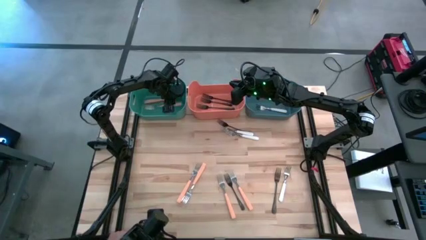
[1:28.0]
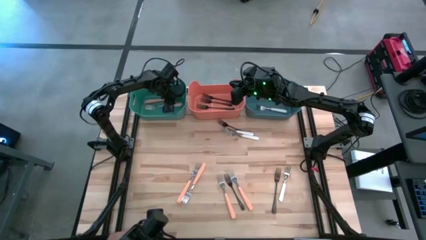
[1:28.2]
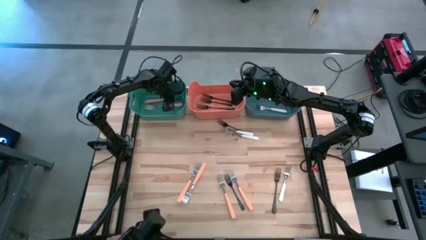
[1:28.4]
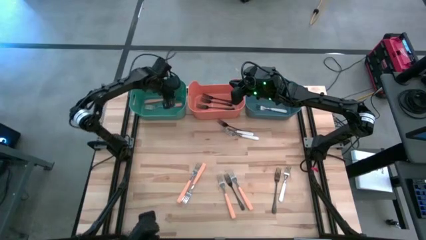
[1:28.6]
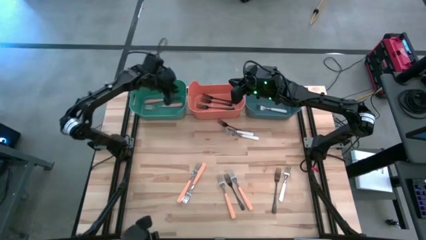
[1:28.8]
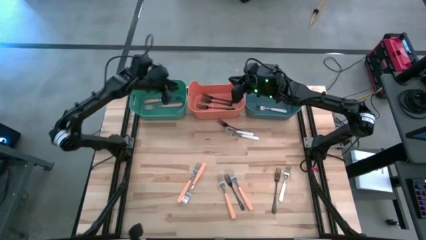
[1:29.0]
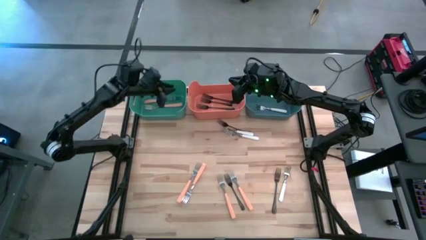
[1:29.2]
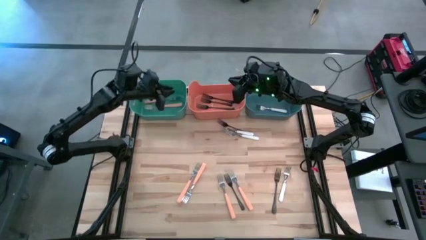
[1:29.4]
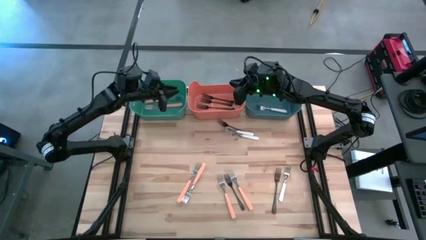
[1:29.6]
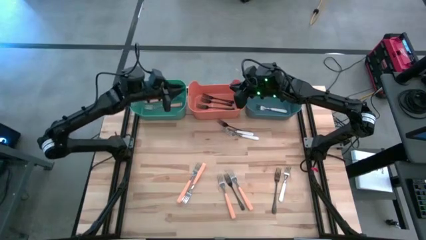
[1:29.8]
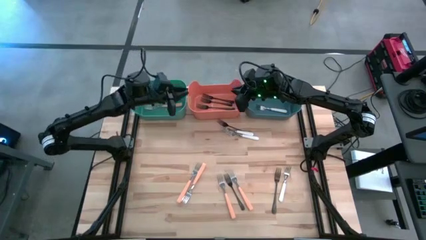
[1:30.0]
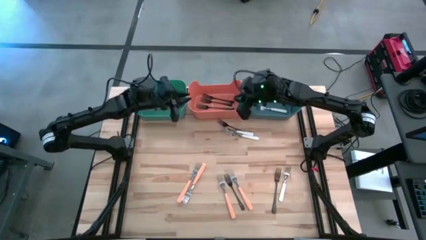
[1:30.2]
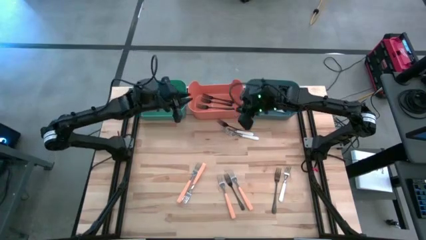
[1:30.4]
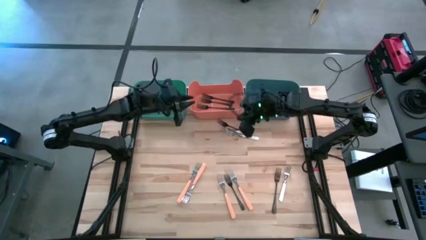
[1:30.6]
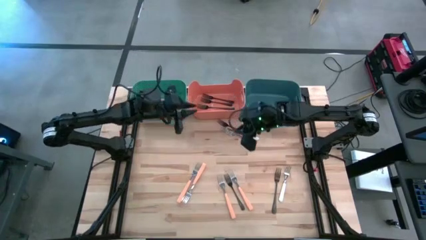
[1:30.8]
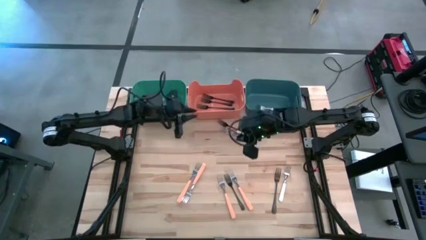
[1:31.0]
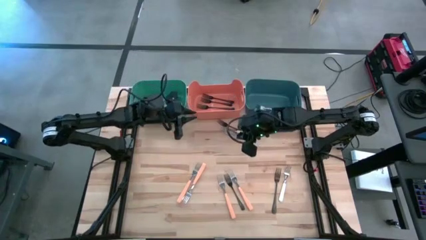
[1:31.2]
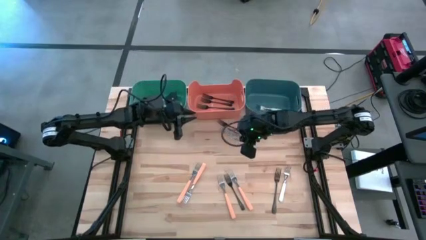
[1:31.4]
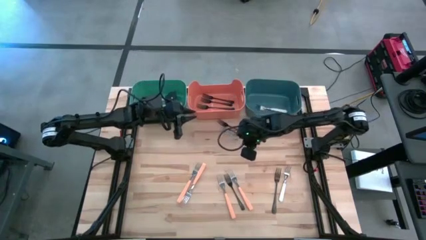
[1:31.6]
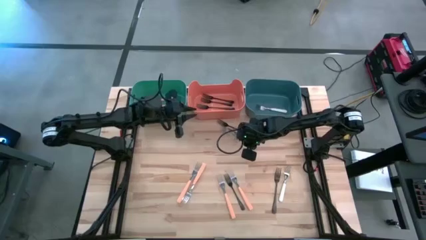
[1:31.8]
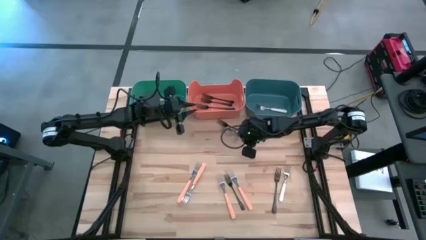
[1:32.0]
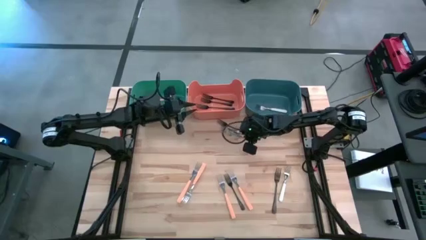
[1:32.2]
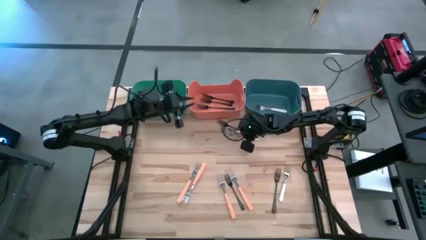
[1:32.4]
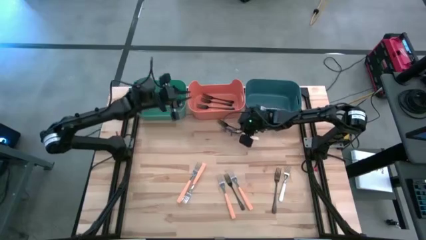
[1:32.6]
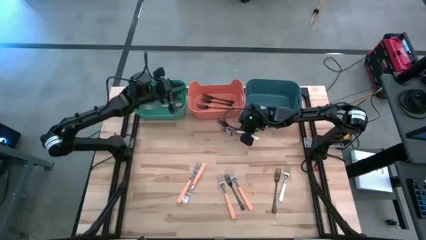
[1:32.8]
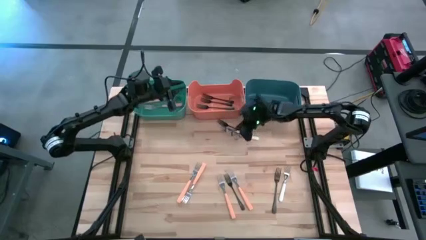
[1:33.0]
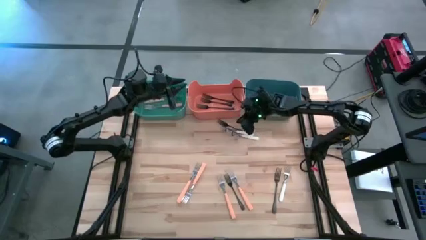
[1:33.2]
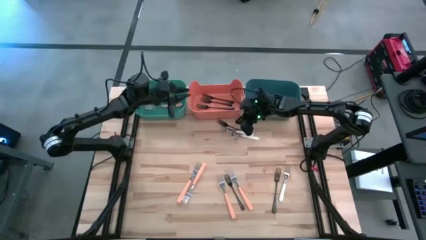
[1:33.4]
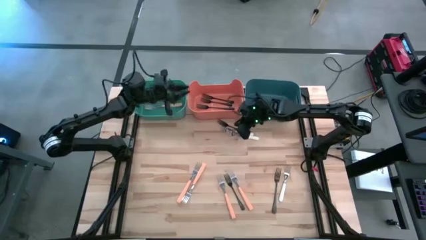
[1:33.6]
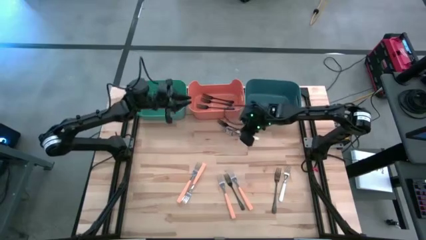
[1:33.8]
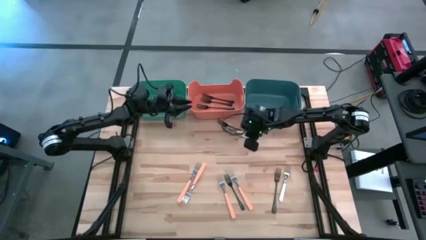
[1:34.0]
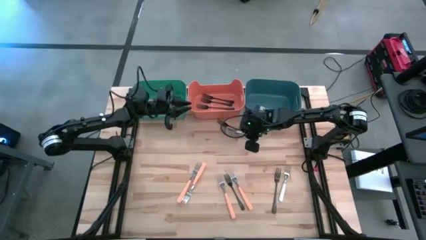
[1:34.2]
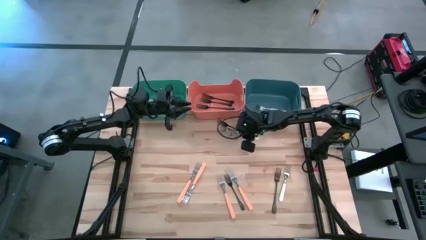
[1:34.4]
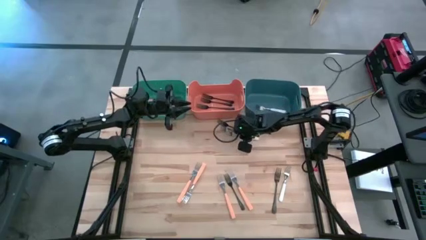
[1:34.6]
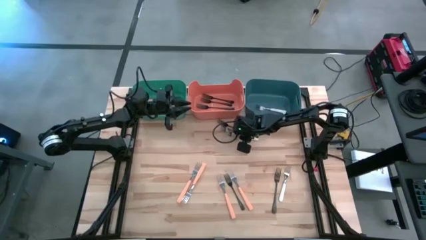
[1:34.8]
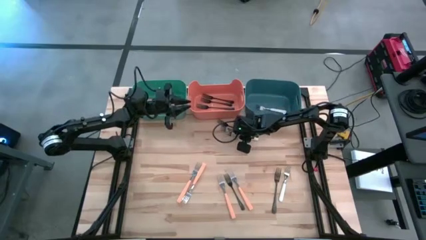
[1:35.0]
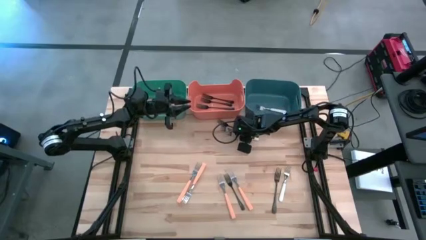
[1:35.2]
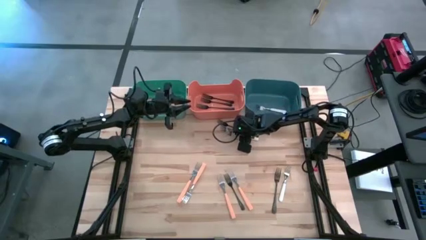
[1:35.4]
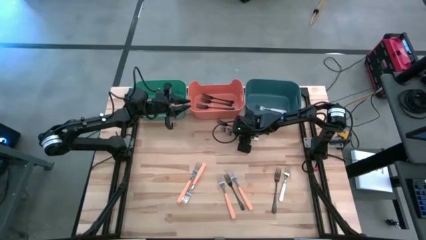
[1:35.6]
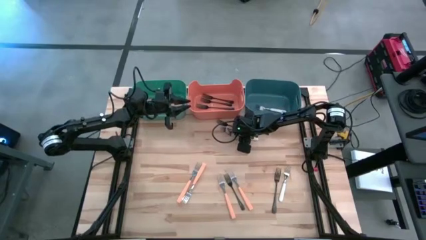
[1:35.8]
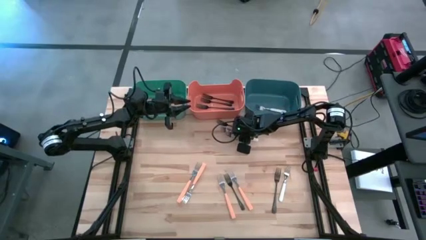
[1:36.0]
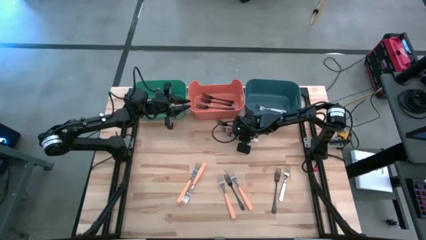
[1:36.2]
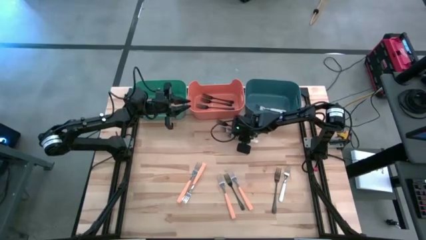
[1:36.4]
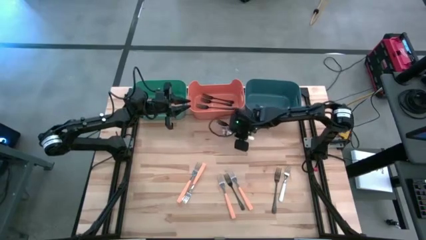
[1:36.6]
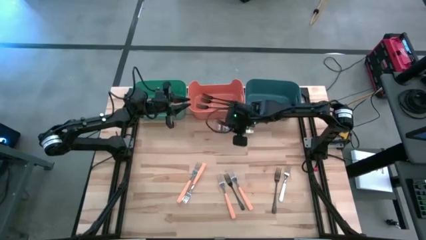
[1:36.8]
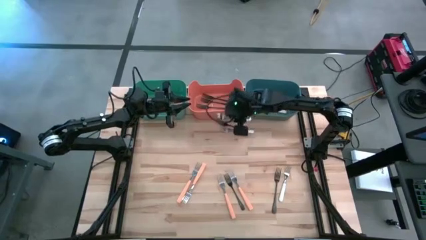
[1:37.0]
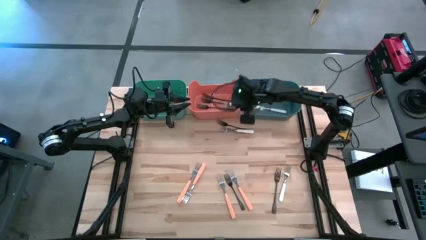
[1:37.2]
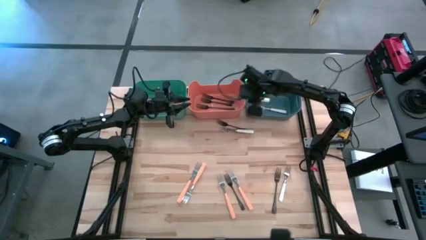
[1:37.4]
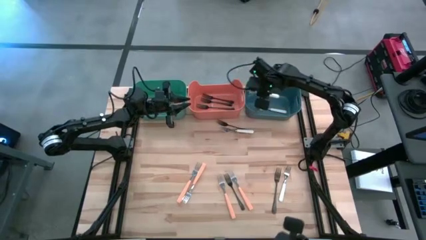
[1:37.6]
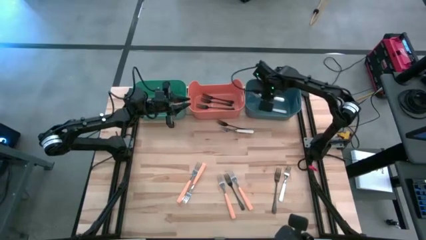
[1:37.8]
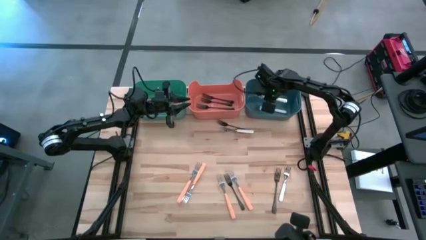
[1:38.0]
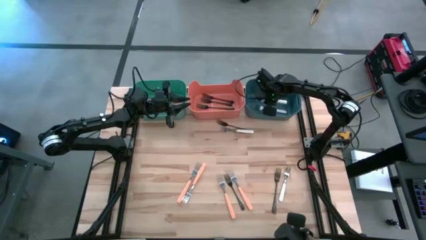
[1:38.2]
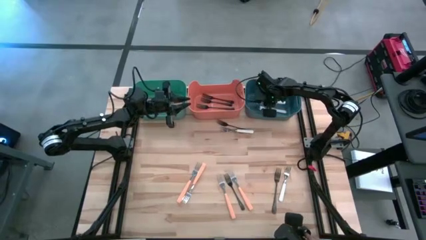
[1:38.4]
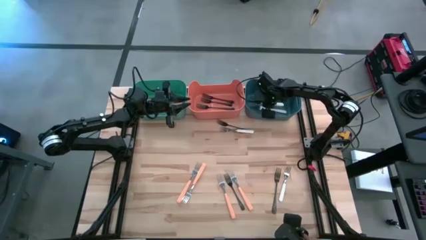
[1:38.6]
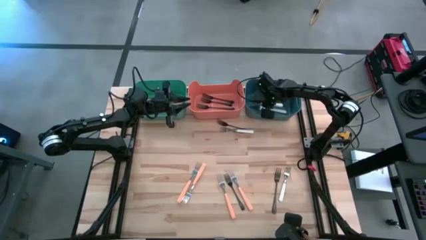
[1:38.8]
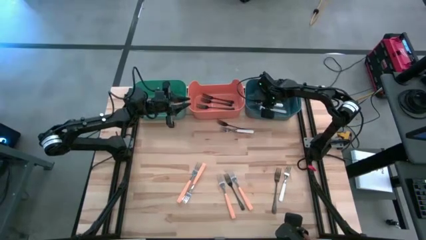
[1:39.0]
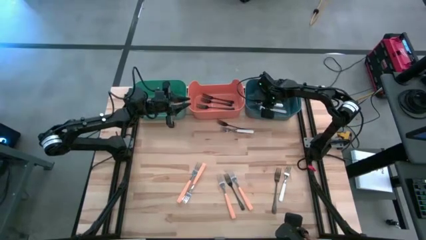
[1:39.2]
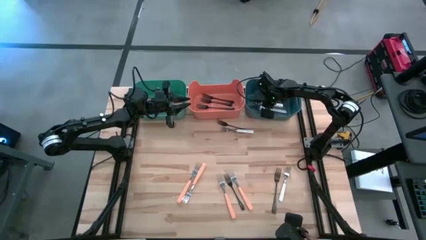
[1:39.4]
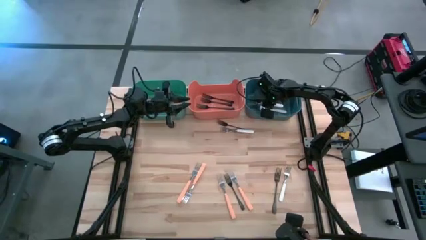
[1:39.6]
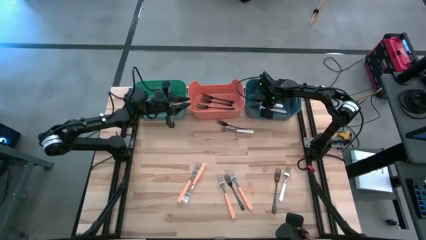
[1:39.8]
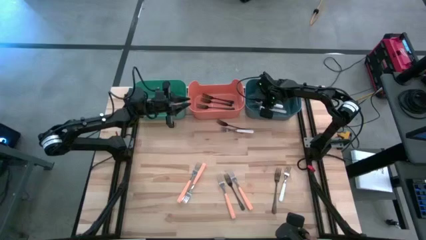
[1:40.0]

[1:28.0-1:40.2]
Task: Sort silverware by color (type)
Put the white fork into the blue bin

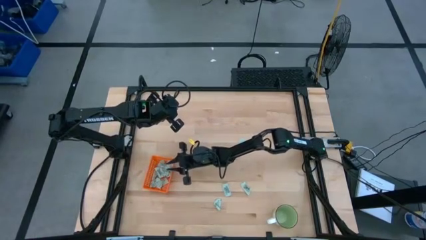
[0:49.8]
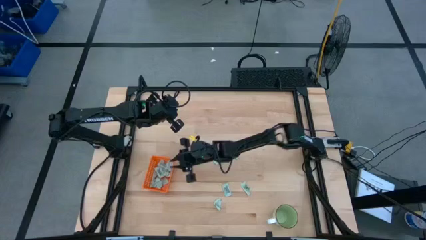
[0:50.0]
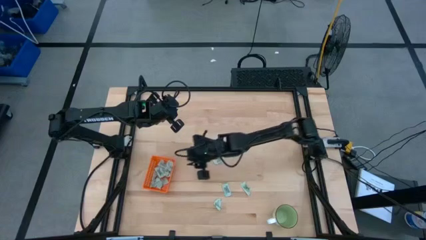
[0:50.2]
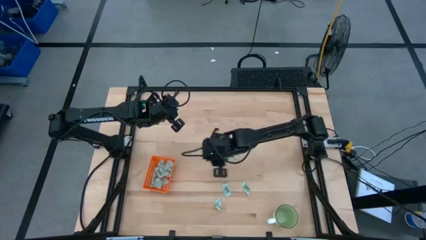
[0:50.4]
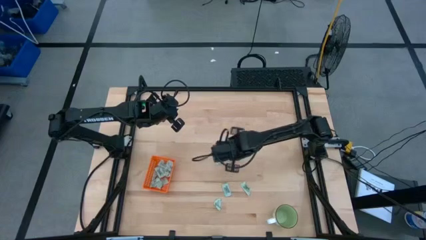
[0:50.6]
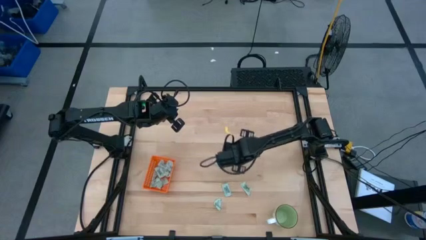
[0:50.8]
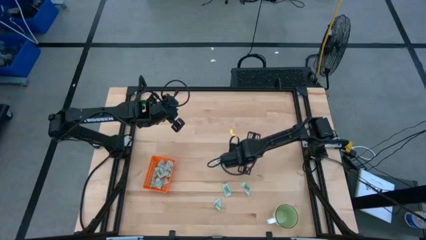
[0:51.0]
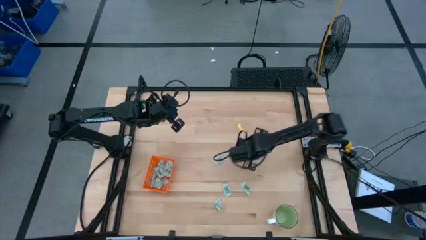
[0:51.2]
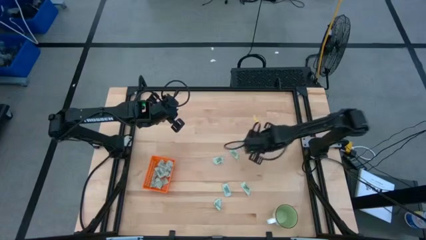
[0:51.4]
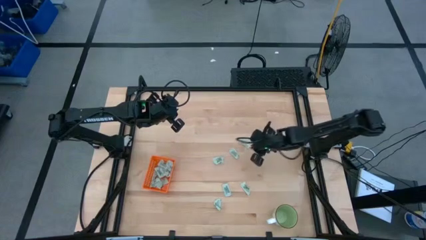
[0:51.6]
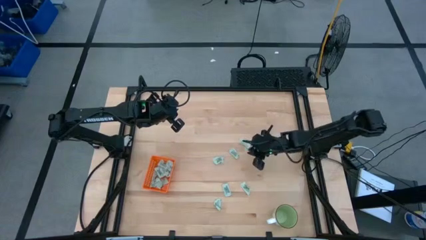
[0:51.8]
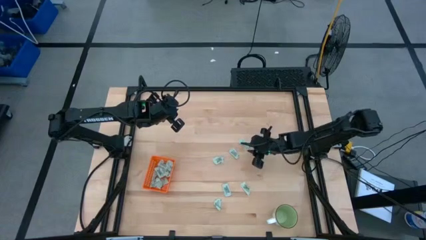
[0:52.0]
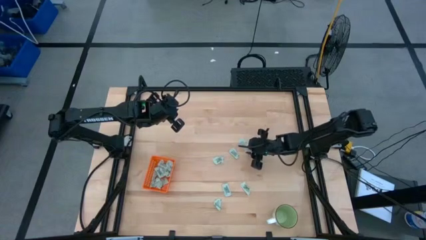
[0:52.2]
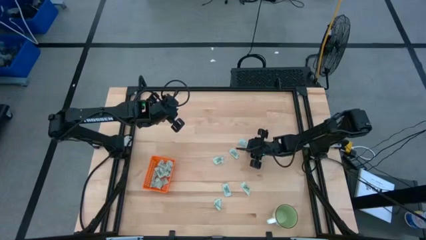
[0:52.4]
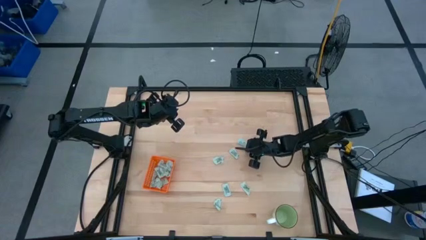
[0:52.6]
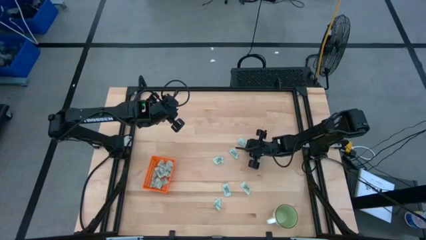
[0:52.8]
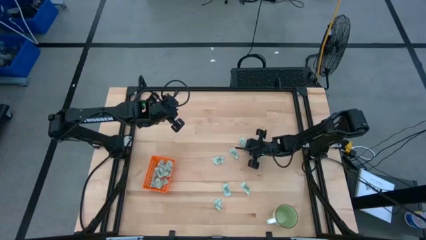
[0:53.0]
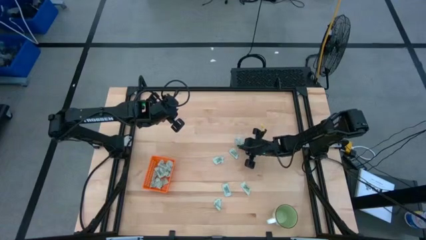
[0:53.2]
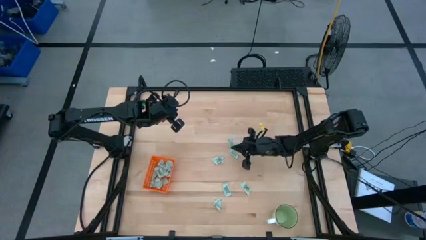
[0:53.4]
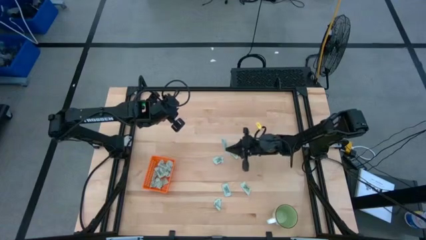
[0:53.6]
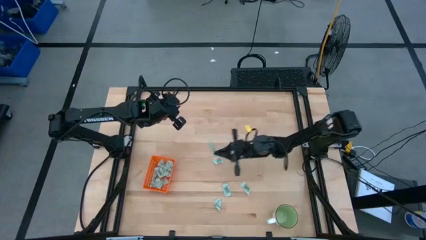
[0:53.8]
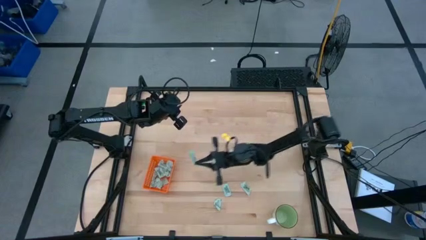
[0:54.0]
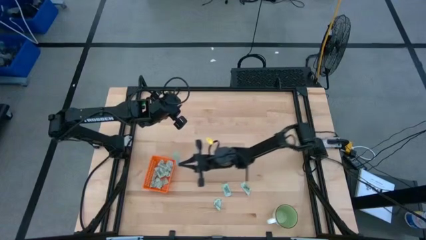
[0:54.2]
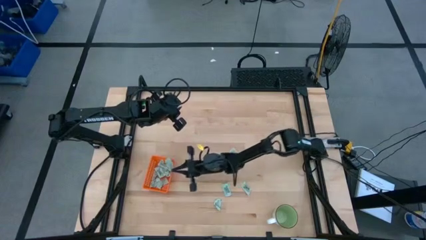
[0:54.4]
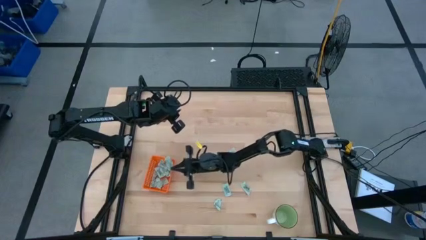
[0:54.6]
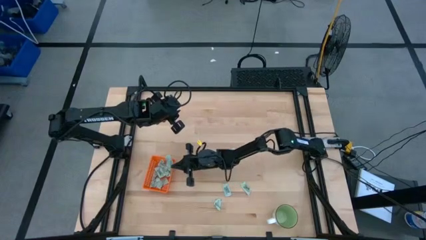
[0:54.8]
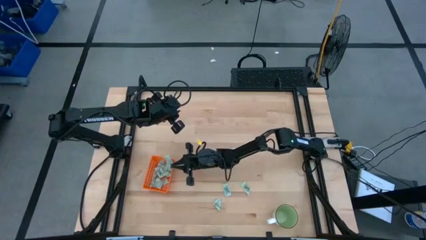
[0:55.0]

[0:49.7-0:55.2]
Task: Pick and place Stevia / Truvia into bins
Put the white stevia packet into the orange bin
